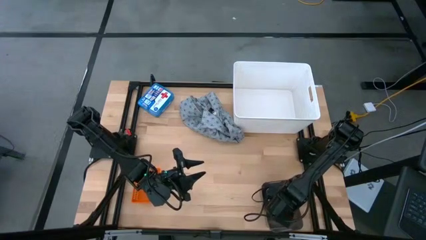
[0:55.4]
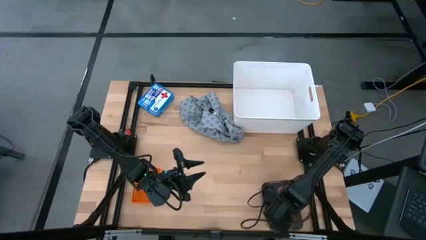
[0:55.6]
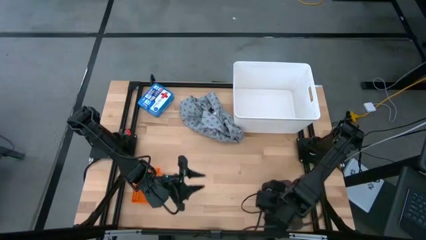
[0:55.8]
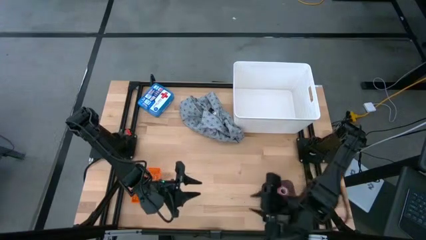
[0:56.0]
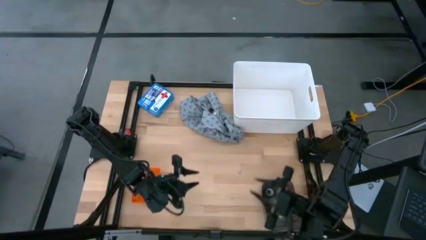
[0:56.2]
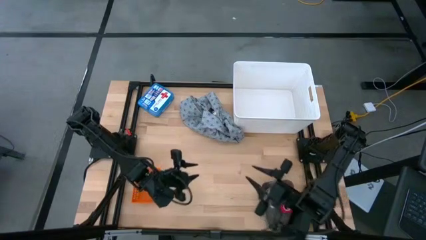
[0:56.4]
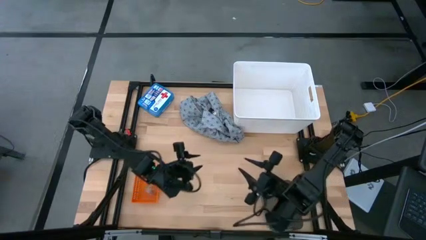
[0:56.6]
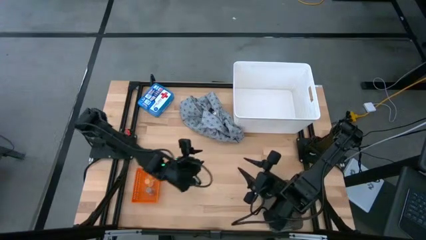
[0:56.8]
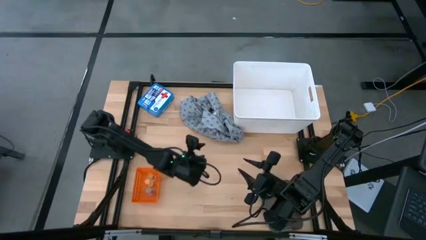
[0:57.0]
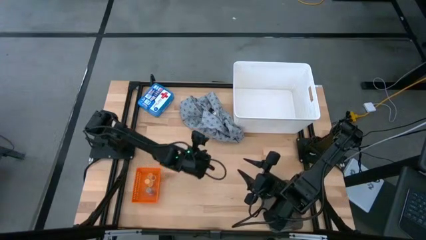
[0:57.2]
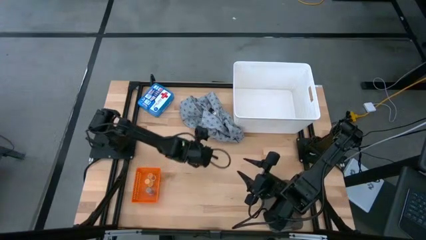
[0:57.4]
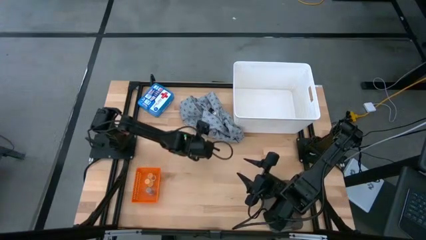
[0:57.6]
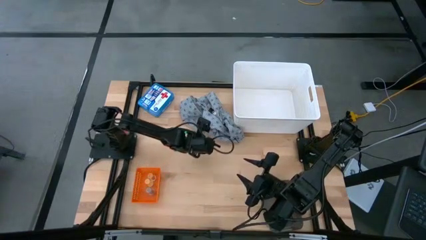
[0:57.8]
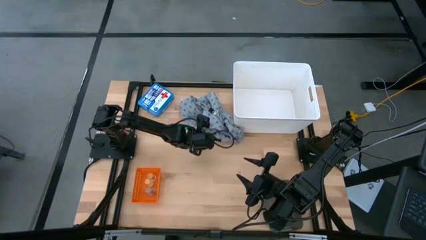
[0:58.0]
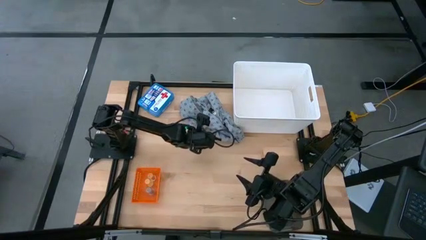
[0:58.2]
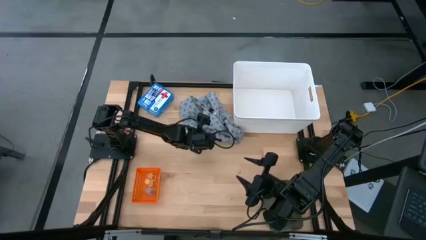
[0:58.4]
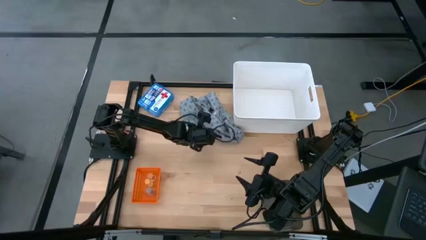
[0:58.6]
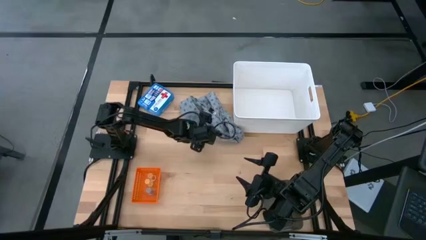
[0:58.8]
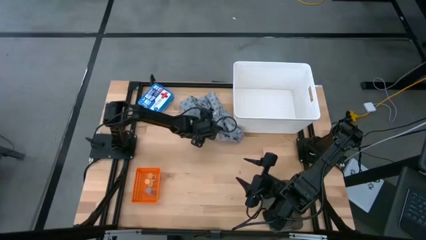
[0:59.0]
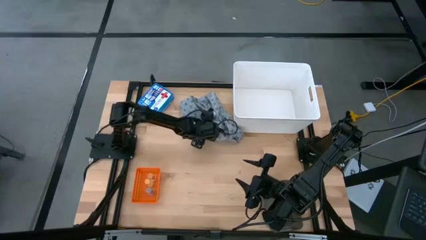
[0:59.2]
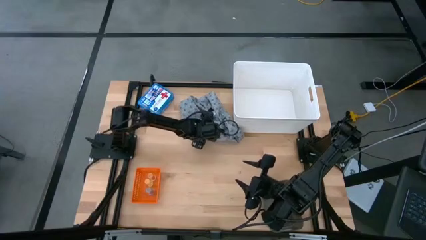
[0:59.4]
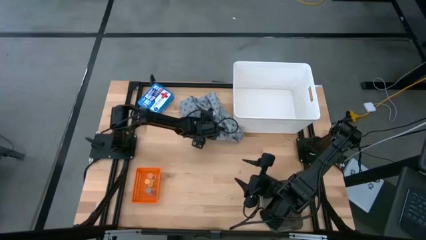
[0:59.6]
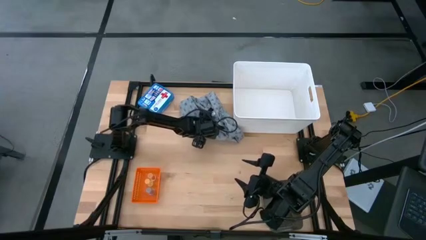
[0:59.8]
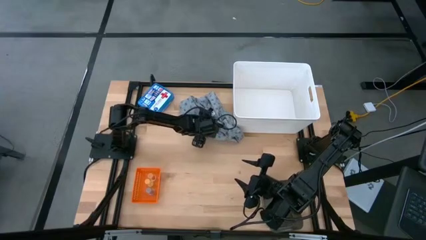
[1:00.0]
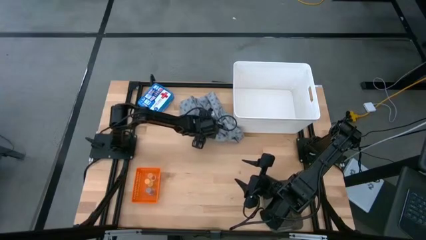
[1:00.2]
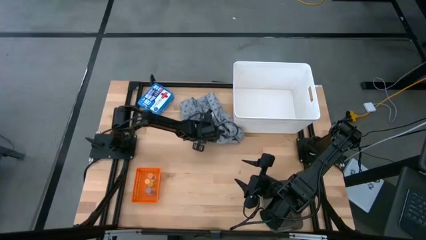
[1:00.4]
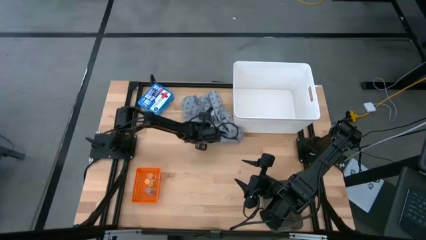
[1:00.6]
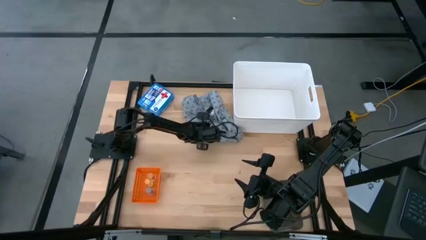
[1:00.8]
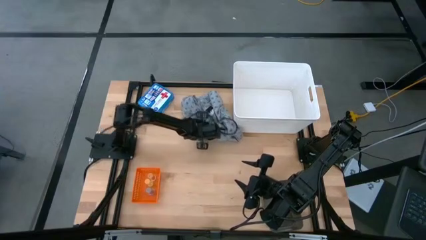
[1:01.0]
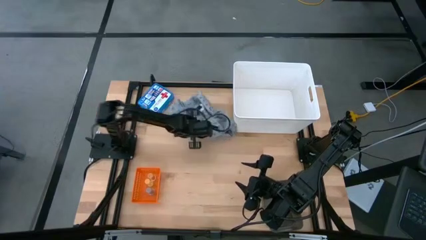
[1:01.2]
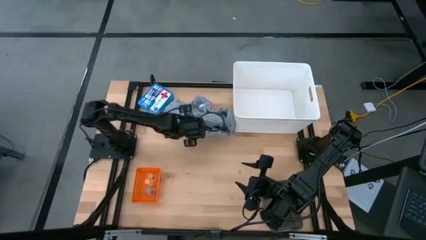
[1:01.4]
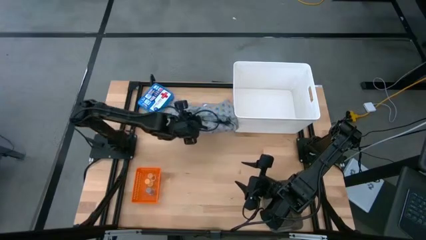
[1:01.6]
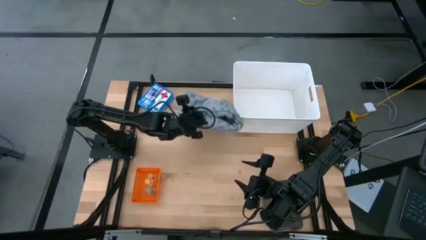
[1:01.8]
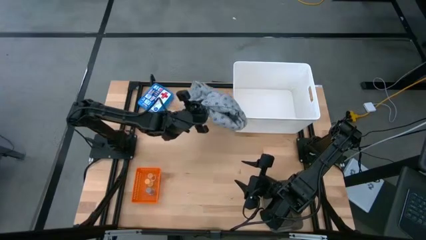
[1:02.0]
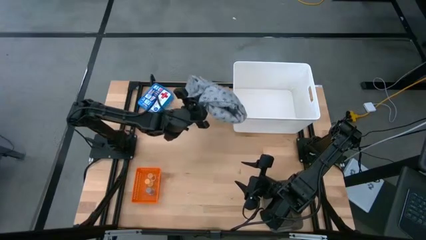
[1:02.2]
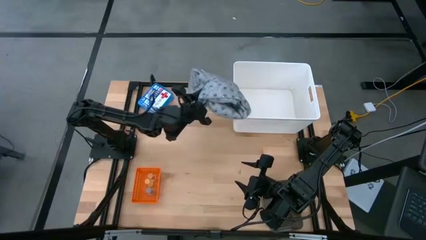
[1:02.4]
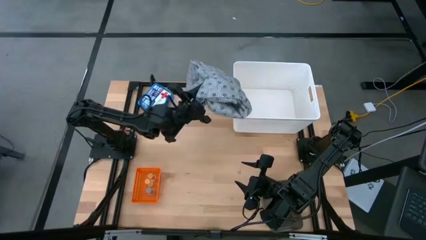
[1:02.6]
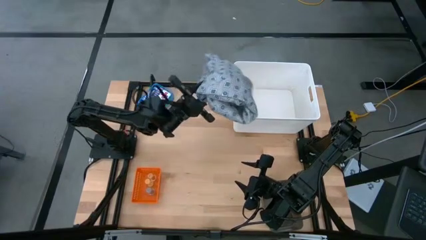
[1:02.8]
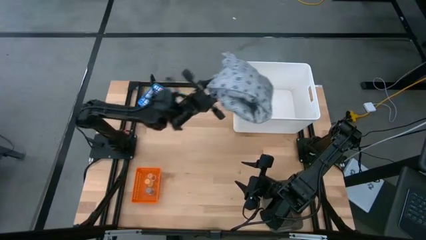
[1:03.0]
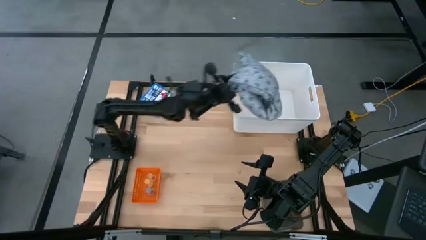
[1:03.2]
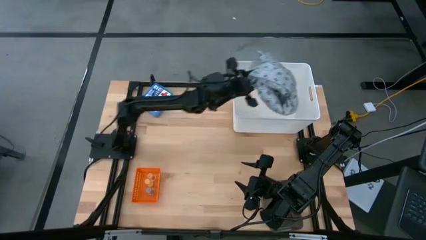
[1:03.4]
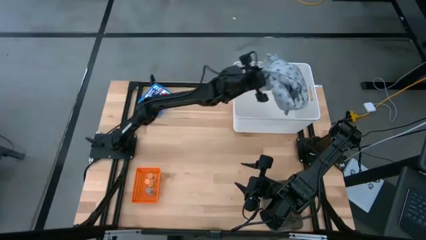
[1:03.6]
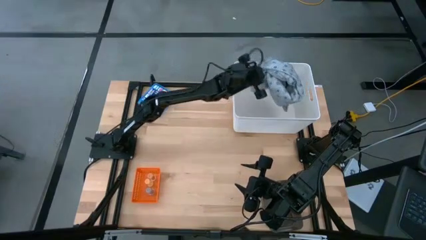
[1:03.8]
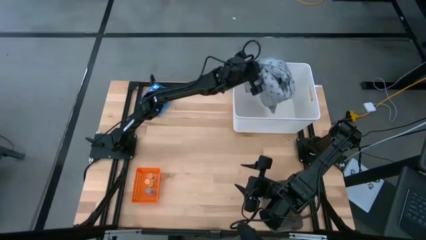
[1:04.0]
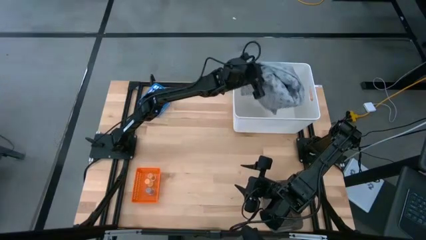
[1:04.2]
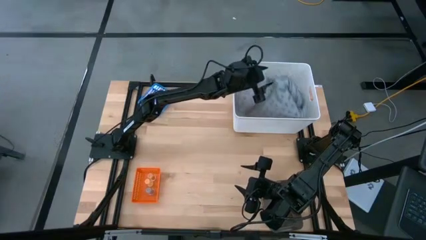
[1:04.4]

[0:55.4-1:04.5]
Task: Pick & place medical supplies in basket/bin
Put the patient gown into the white bin

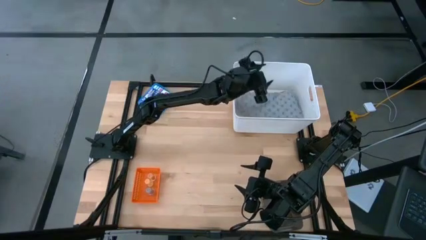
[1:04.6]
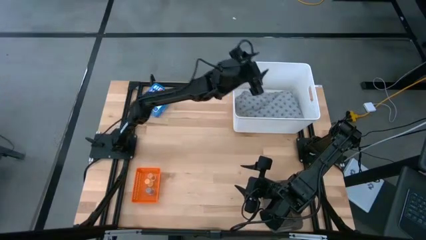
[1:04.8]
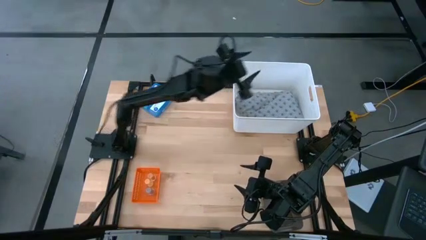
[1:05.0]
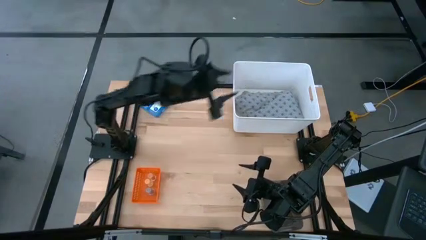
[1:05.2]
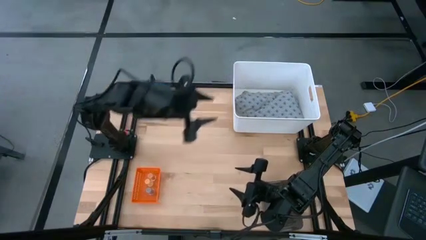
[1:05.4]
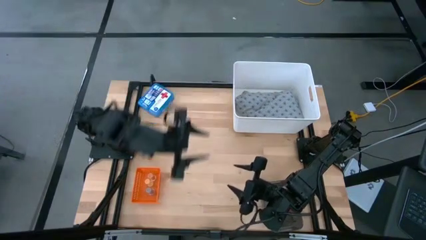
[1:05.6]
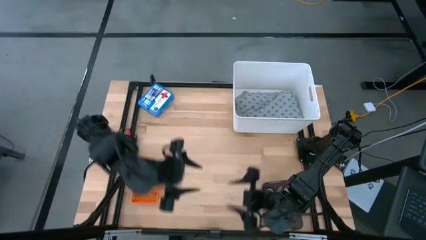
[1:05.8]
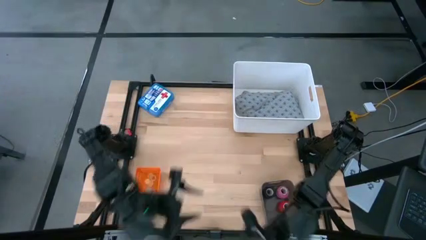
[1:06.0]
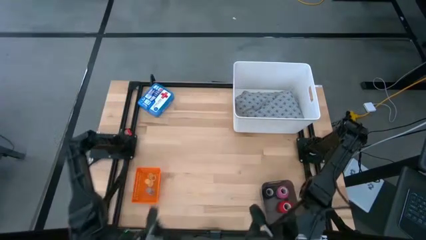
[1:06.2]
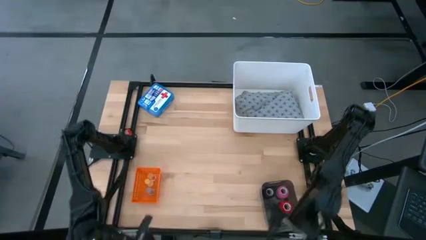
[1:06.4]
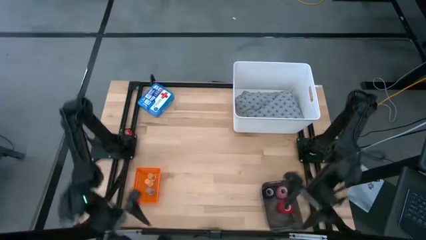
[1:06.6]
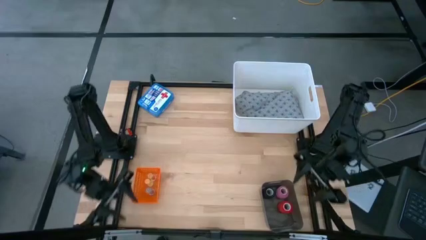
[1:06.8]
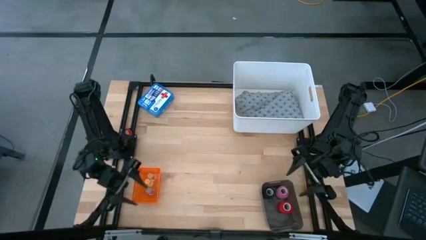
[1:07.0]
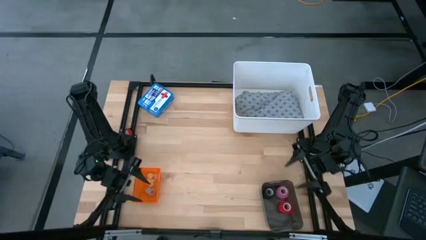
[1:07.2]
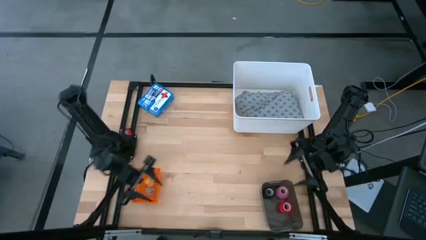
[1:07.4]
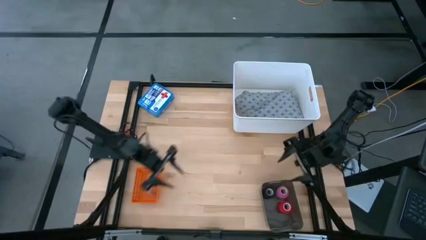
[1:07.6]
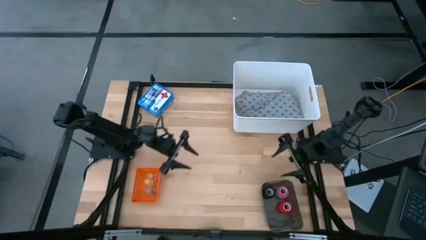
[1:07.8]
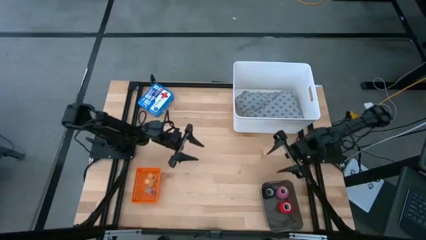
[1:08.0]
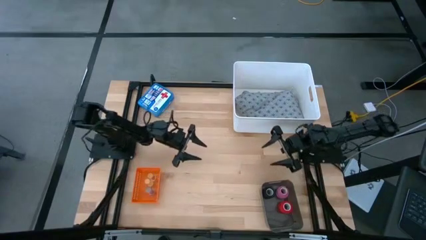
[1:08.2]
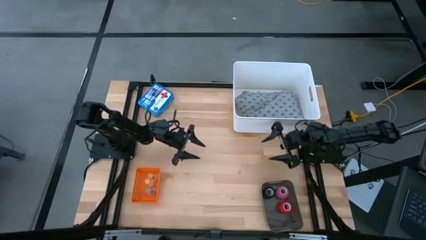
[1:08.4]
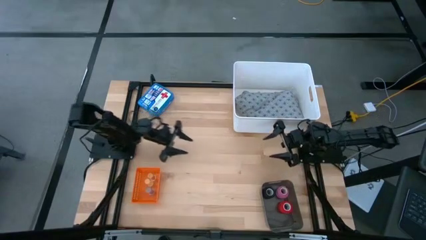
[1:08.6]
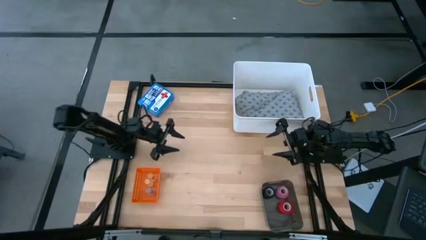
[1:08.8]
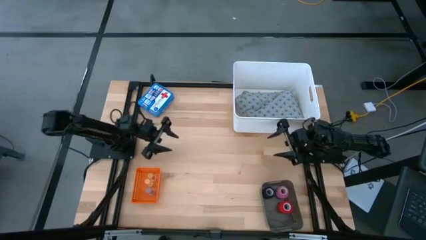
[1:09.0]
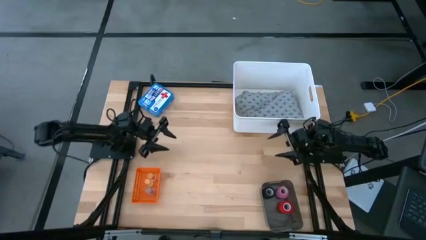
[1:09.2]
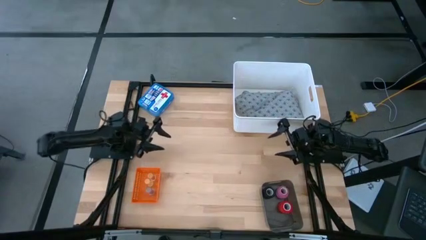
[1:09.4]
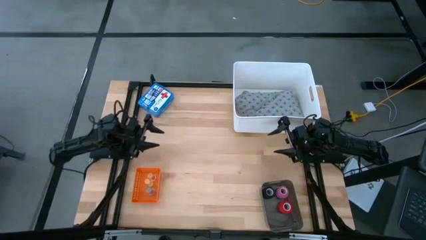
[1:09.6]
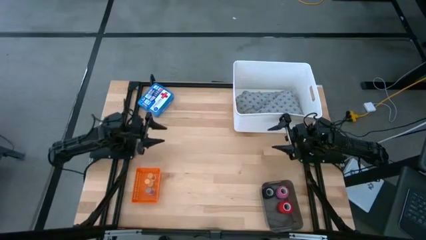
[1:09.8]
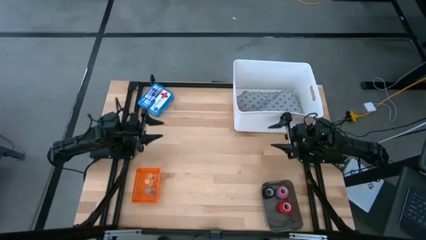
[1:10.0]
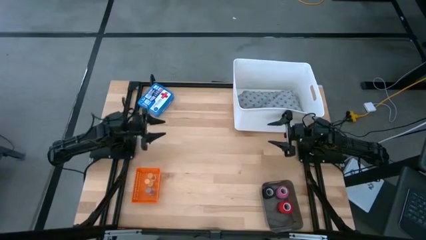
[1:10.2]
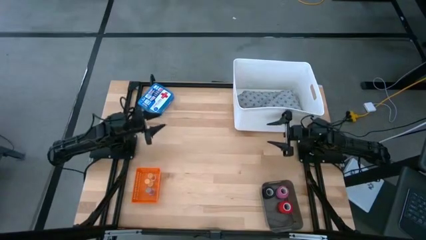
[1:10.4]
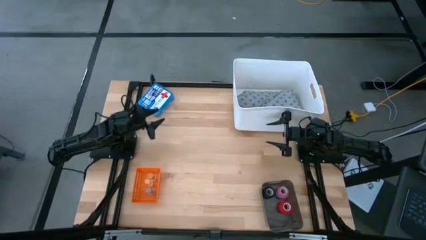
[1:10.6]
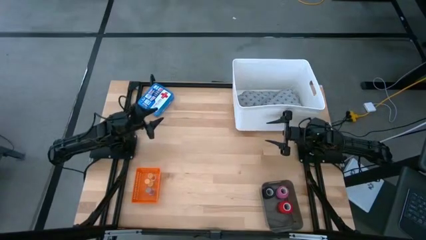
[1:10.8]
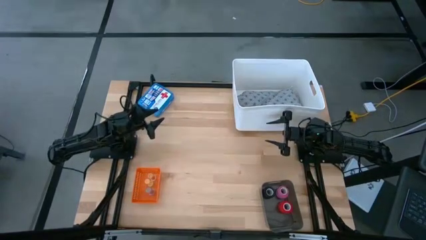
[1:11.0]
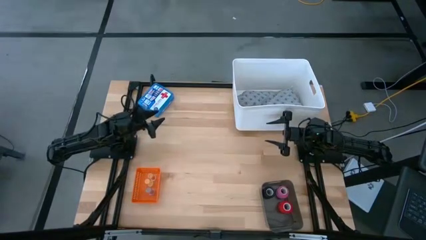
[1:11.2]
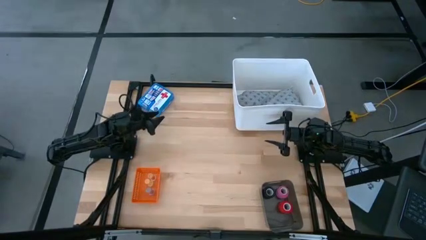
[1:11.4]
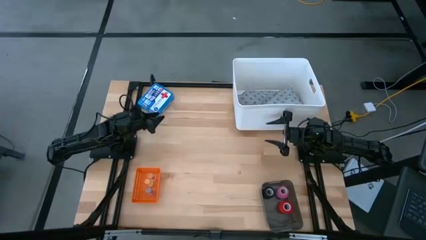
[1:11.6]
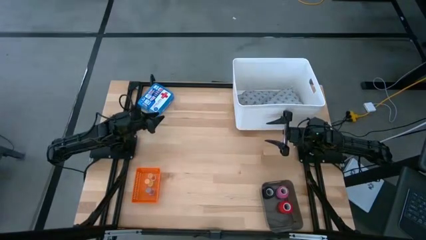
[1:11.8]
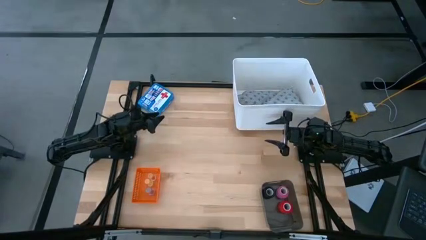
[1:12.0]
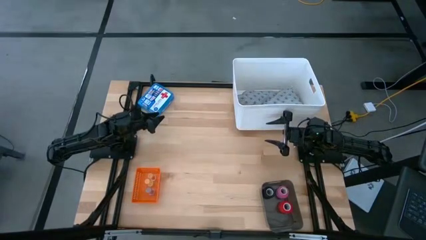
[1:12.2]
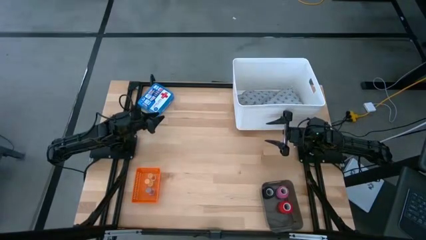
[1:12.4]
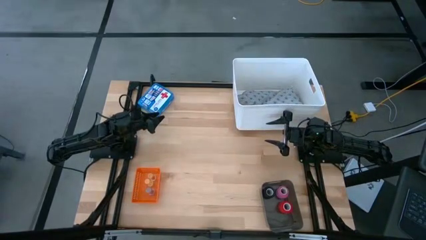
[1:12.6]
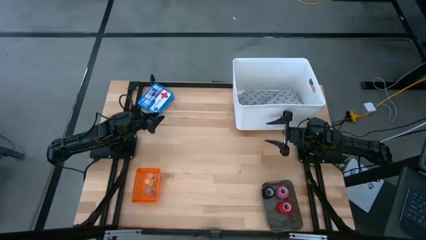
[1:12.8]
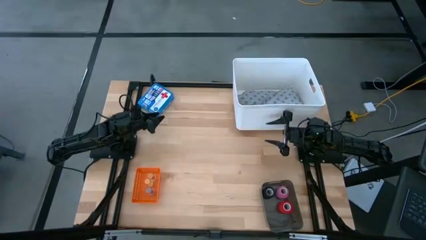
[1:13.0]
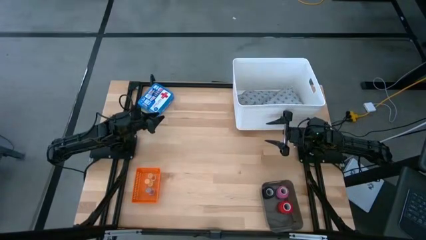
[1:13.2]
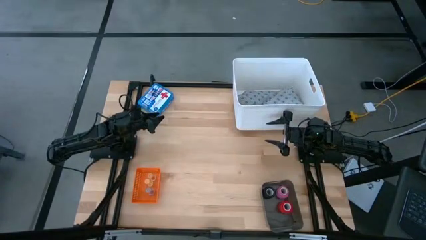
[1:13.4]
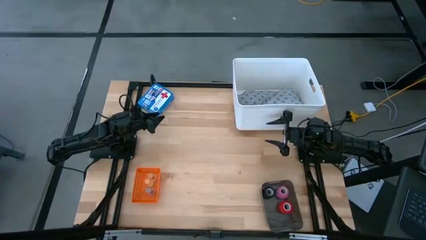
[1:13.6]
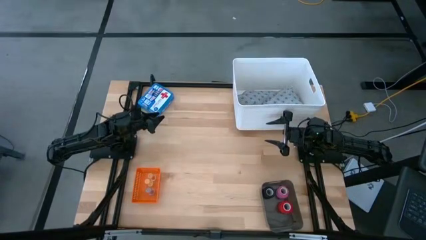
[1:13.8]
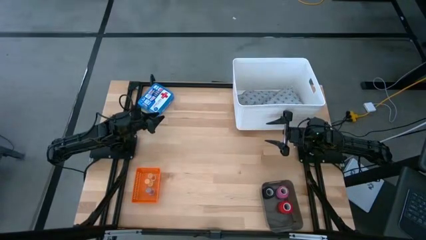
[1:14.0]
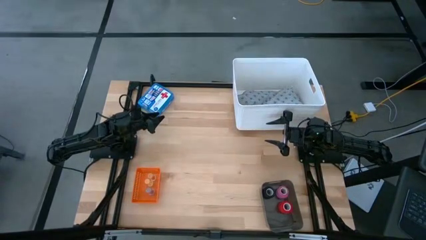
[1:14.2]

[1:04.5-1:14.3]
Return to Home Position
